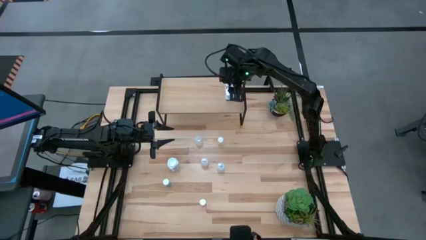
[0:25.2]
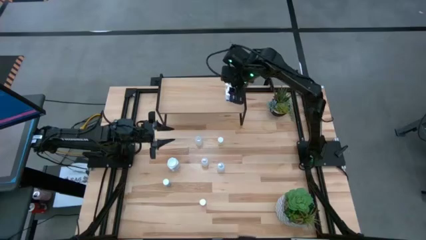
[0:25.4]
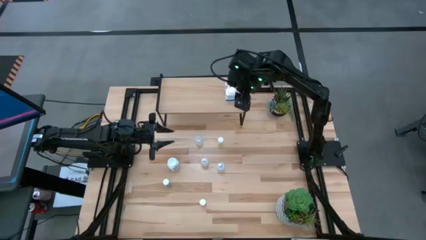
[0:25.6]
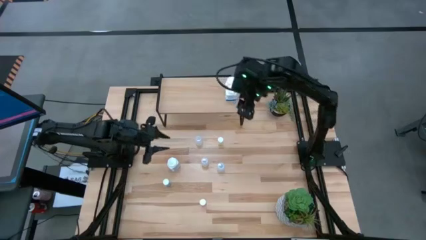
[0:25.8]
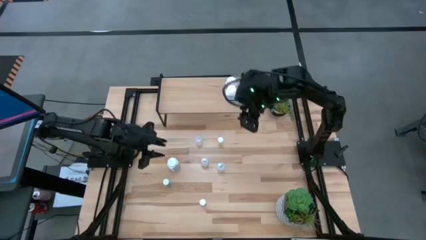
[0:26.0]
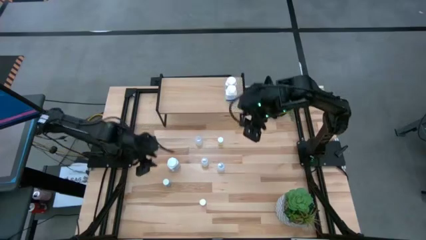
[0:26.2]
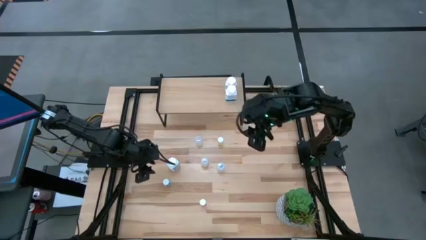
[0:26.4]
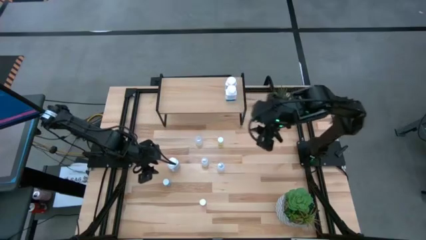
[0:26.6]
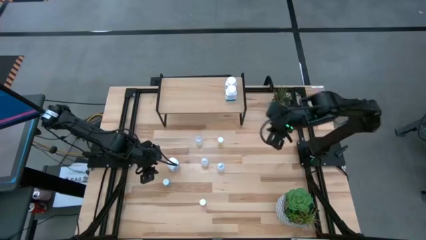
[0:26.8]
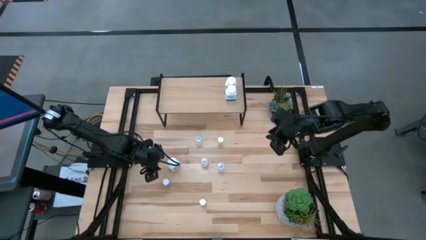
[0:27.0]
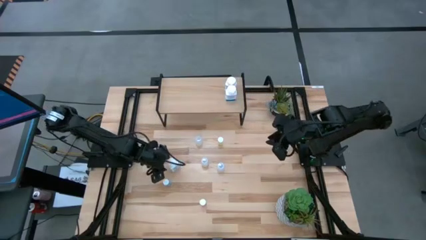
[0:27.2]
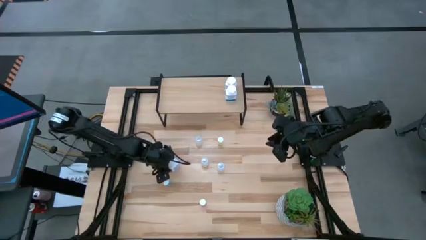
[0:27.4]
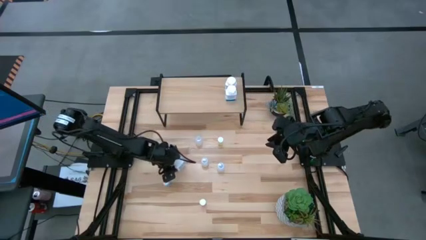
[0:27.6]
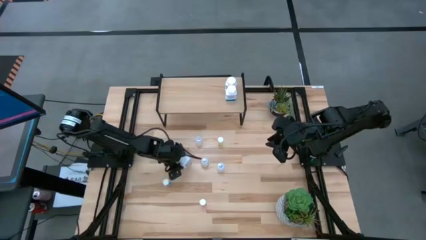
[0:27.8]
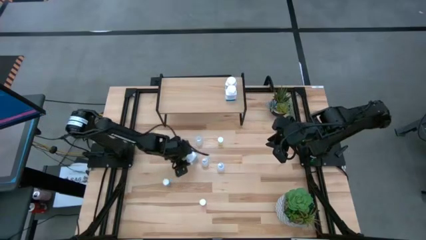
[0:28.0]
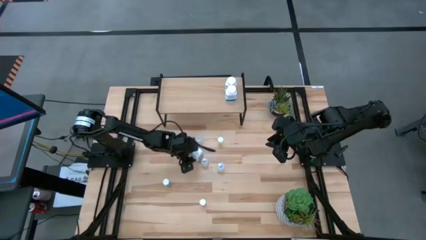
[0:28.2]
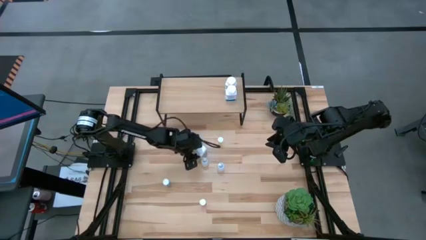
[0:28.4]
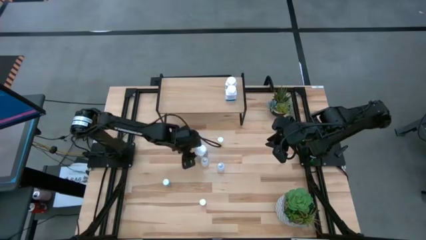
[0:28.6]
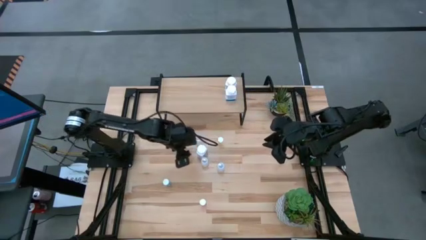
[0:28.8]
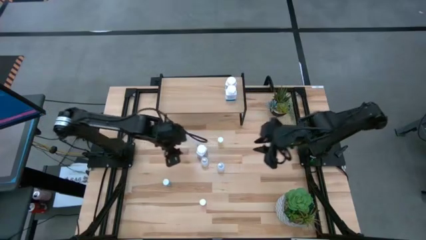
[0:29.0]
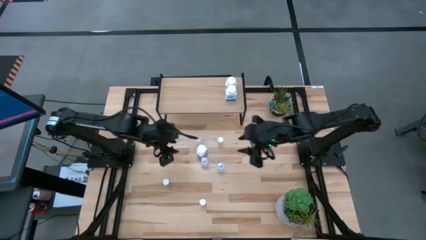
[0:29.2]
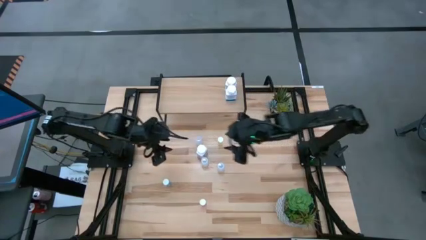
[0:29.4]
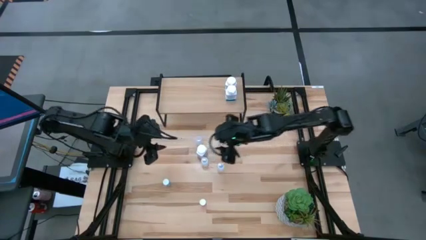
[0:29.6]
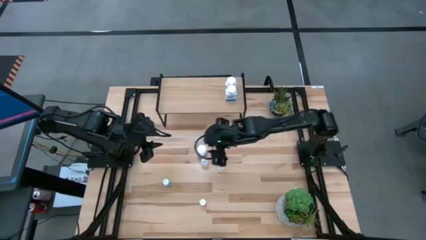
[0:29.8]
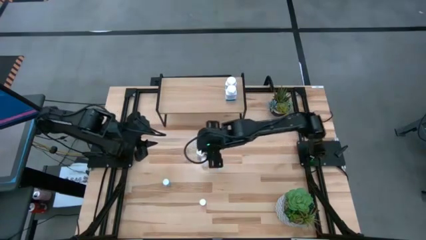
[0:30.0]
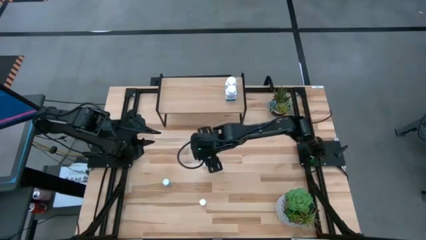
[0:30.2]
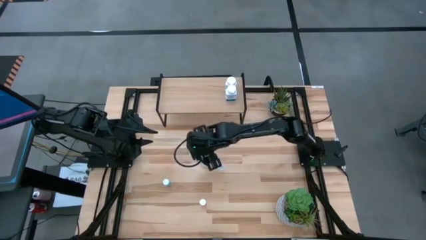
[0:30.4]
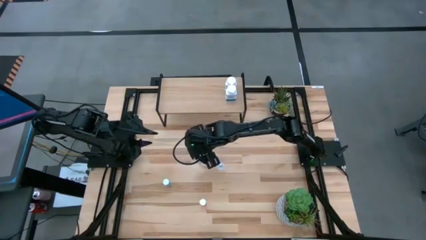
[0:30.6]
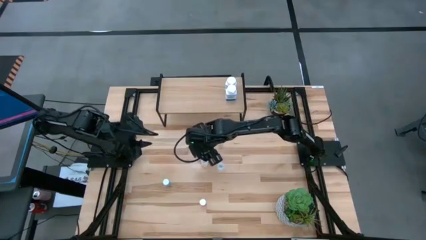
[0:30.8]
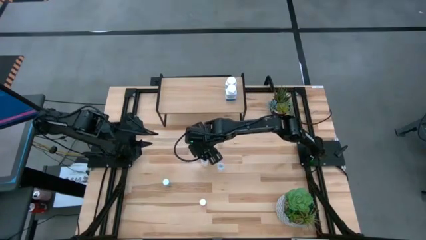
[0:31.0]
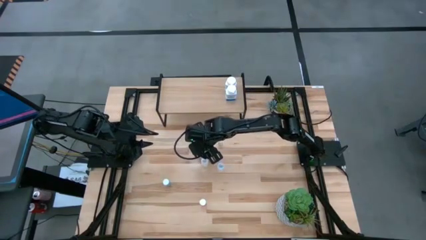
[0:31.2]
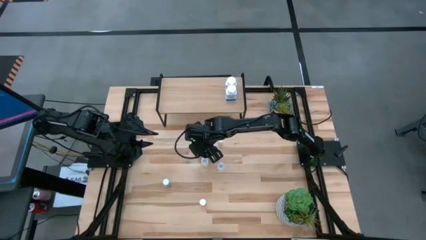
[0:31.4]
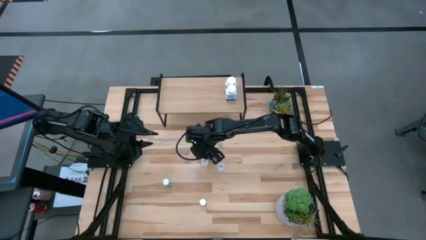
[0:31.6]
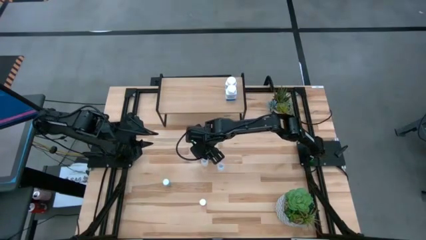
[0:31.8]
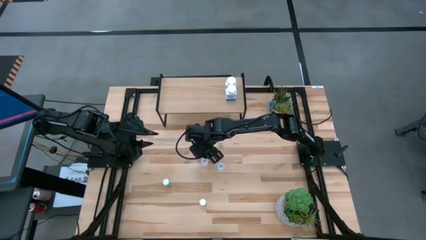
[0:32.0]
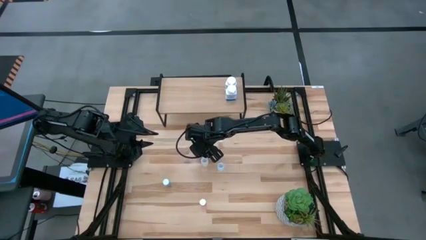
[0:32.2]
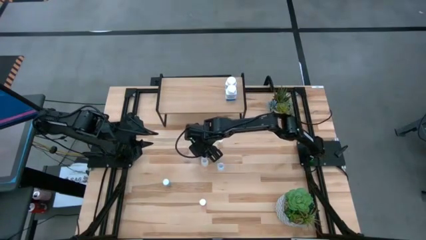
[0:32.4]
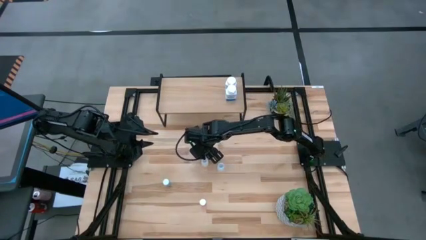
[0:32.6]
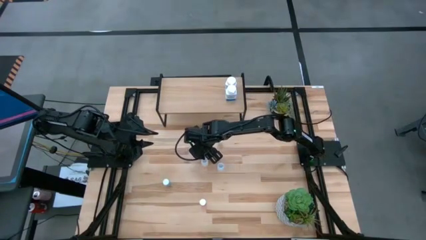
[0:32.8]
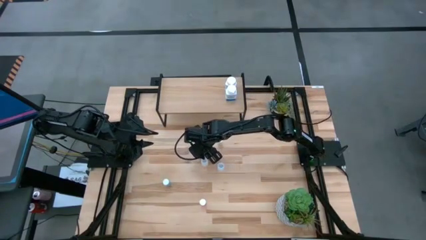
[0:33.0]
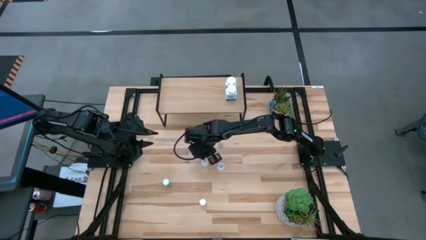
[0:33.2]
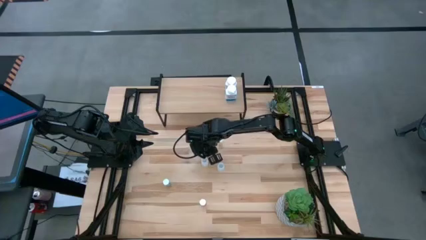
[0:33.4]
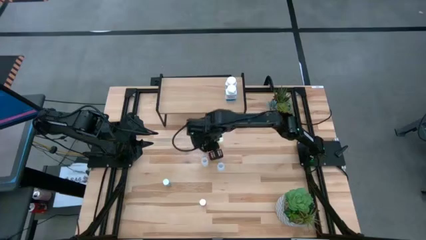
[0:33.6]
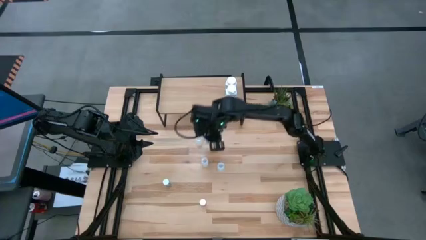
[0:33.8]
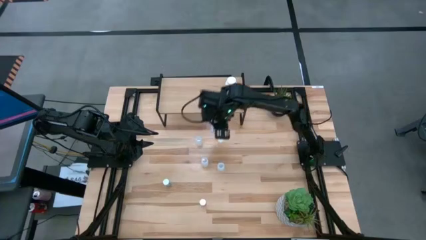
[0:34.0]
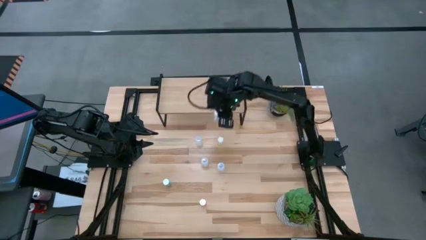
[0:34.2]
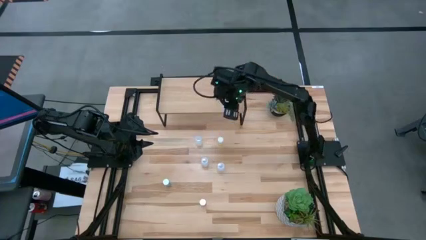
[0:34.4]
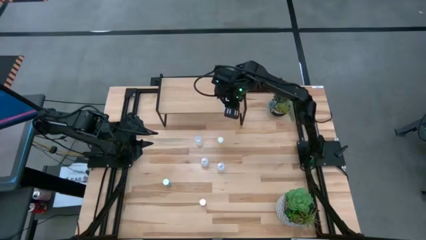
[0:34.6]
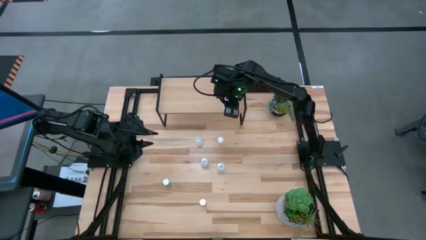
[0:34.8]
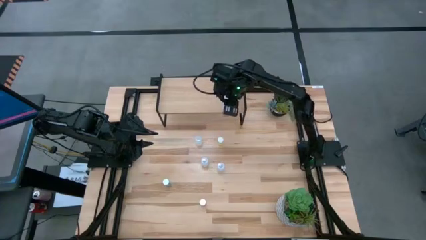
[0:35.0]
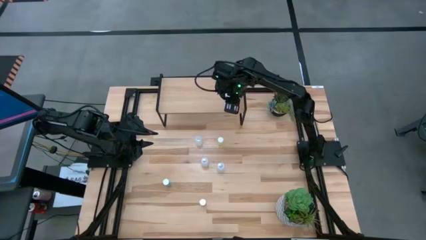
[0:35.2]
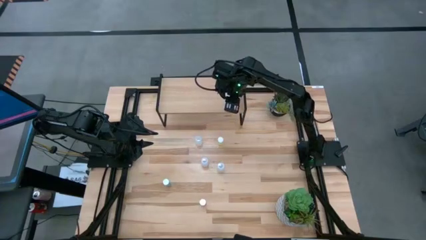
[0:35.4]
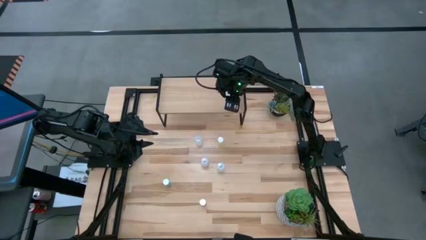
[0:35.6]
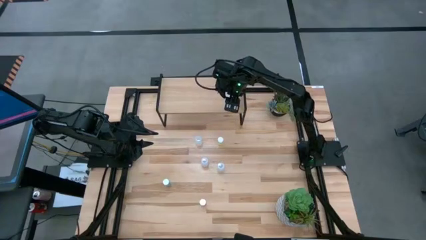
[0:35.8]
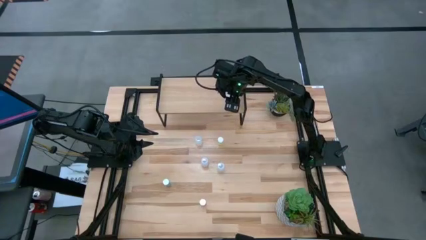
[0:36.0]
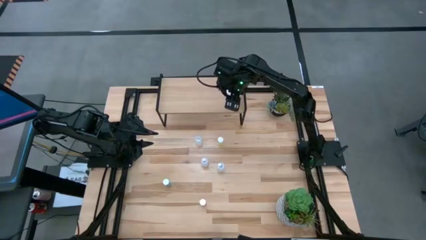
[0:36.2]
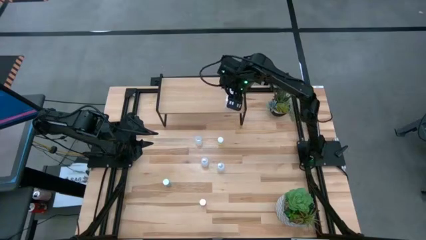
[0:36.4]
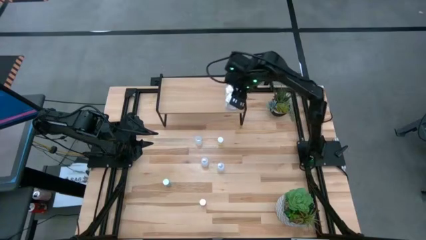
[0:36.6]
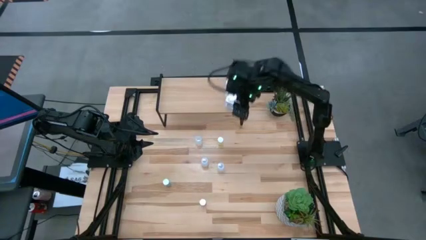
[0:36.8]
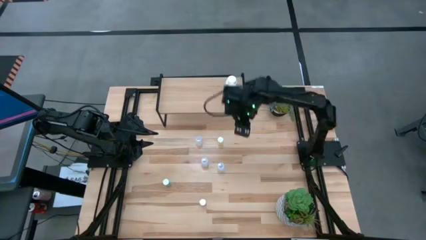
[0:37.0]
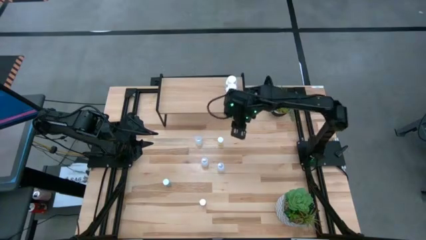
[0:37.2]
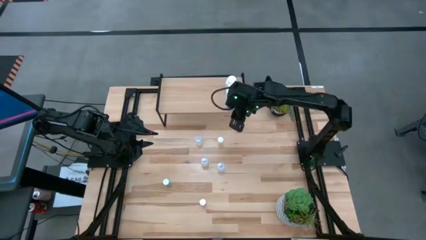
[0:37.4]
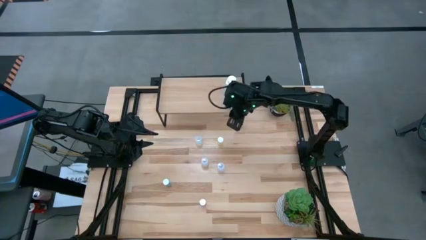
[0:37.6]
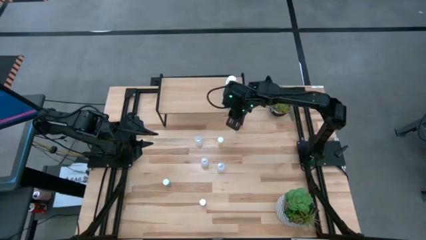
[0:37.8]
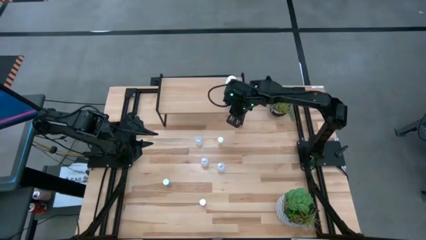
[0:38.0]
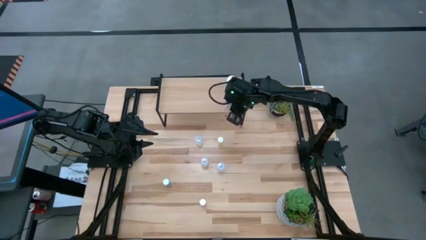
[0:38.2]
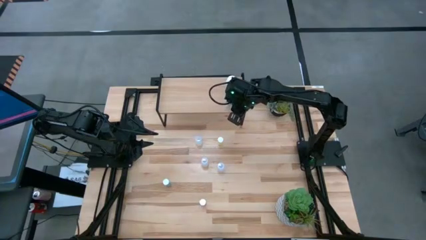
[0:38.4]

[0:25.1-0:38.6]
Task: Pick and place medicine bottles onto shelf by color
Put the white big pill bottle on the shelf aligned with the other white big pill bottles
